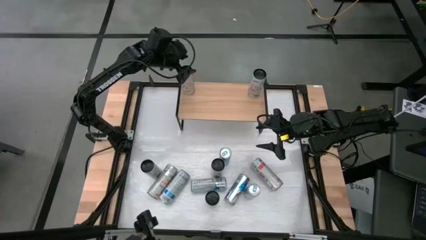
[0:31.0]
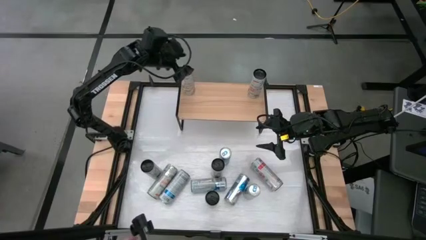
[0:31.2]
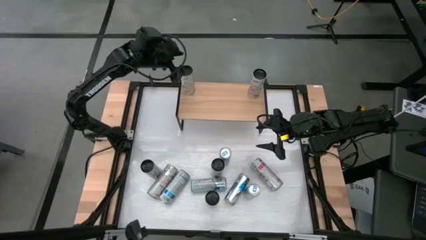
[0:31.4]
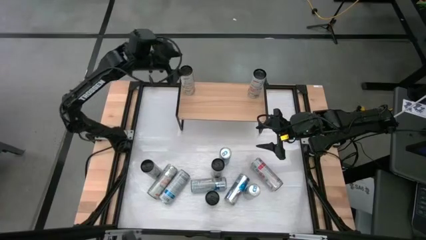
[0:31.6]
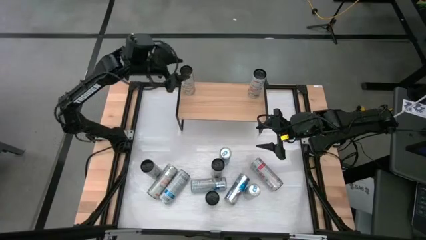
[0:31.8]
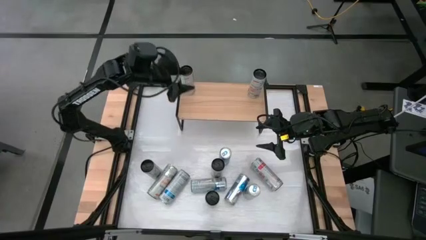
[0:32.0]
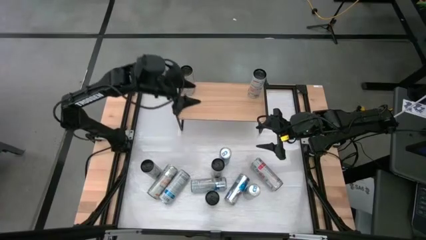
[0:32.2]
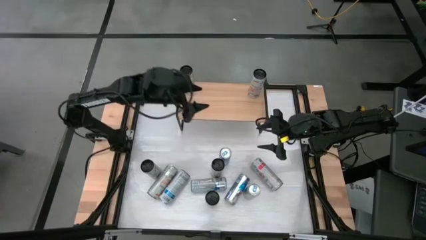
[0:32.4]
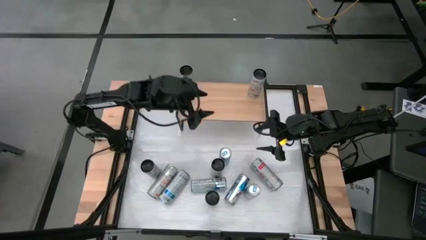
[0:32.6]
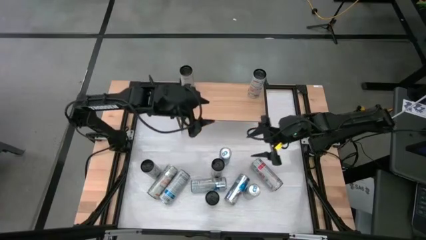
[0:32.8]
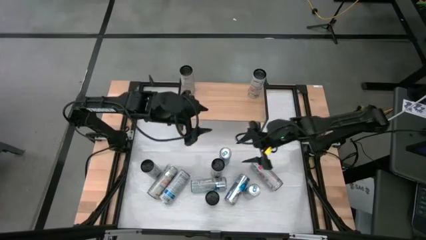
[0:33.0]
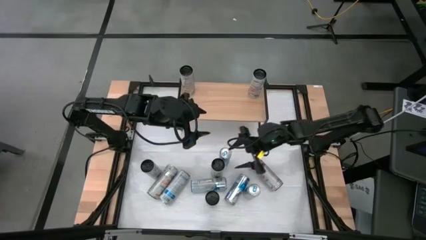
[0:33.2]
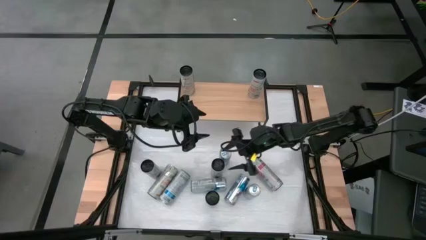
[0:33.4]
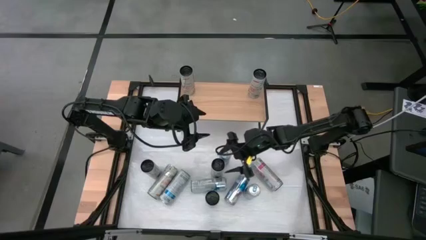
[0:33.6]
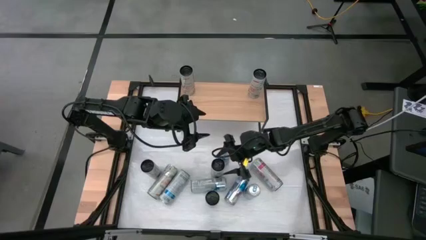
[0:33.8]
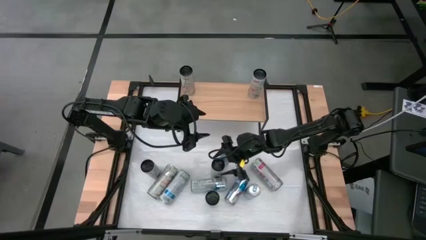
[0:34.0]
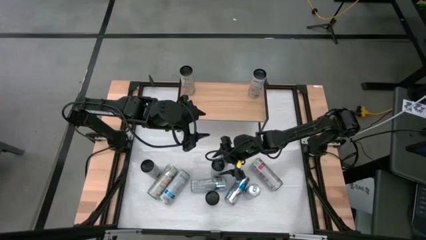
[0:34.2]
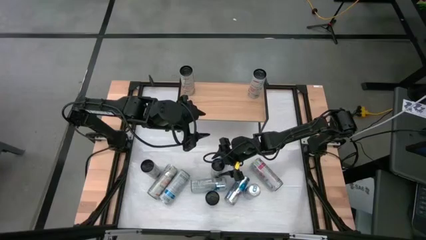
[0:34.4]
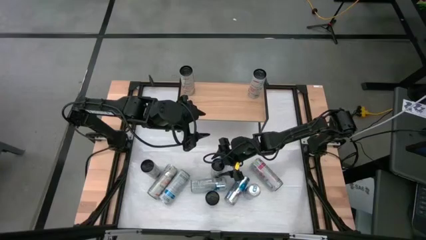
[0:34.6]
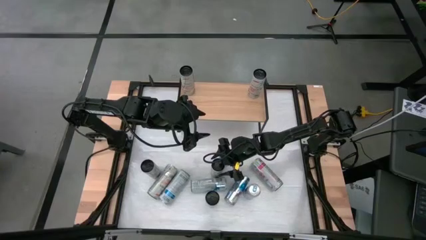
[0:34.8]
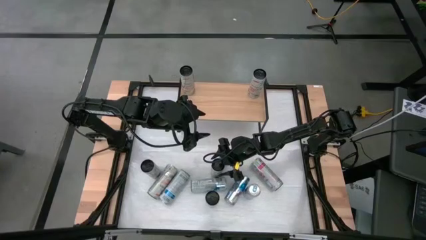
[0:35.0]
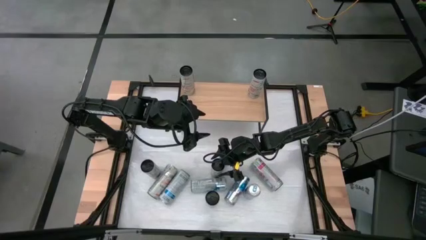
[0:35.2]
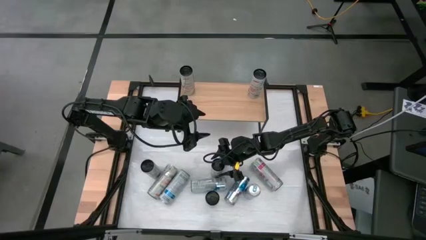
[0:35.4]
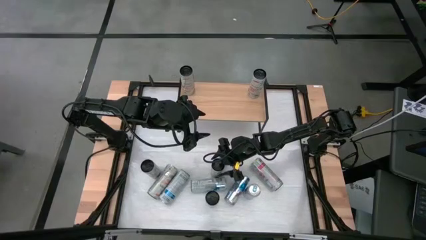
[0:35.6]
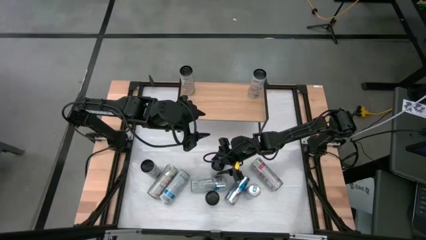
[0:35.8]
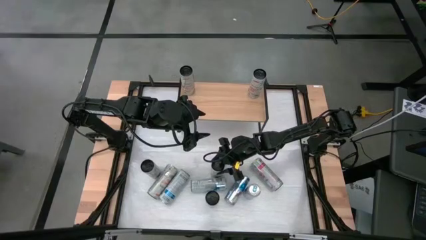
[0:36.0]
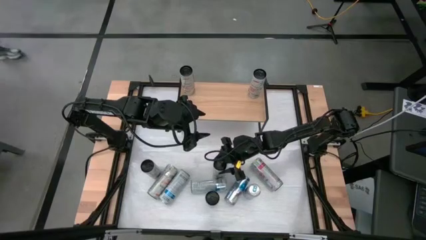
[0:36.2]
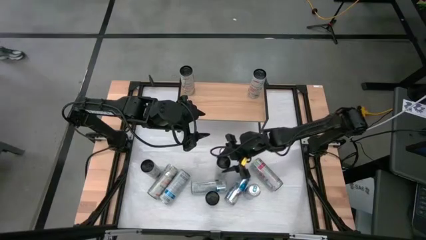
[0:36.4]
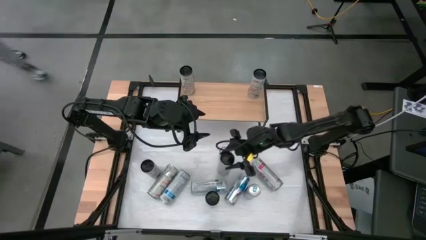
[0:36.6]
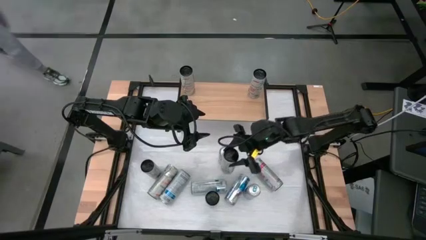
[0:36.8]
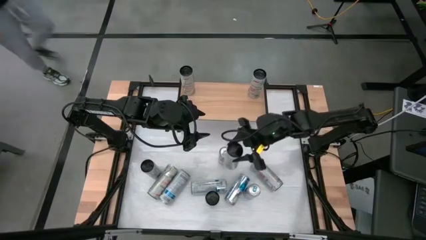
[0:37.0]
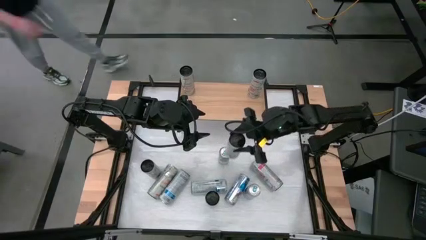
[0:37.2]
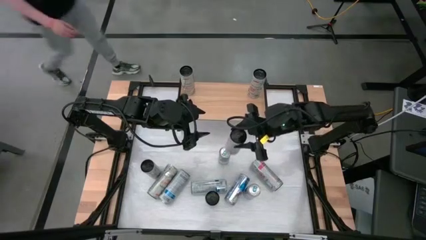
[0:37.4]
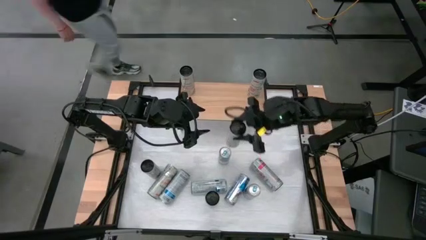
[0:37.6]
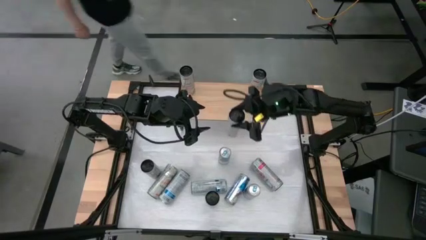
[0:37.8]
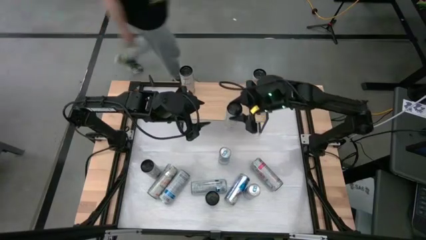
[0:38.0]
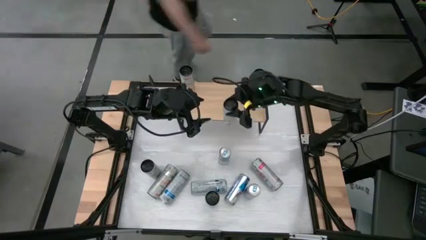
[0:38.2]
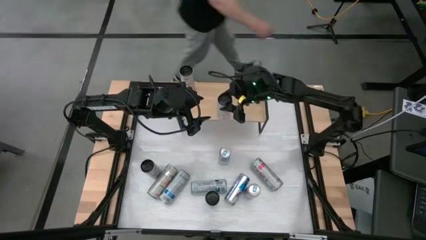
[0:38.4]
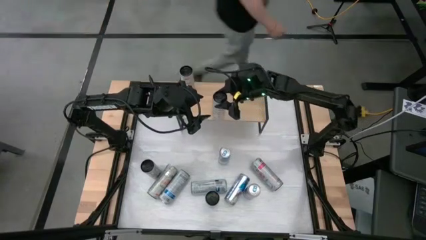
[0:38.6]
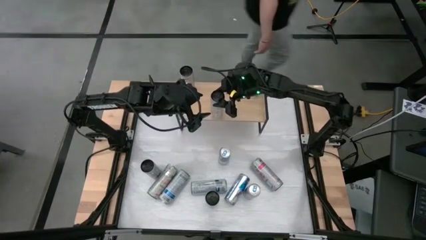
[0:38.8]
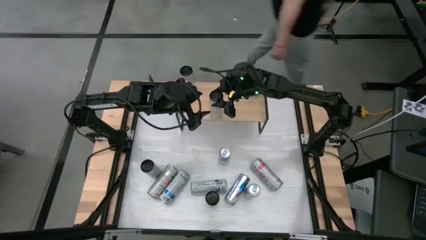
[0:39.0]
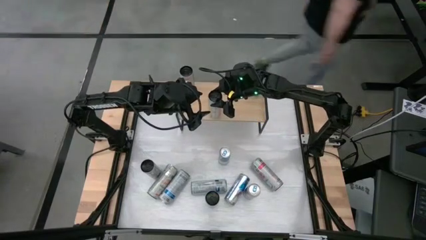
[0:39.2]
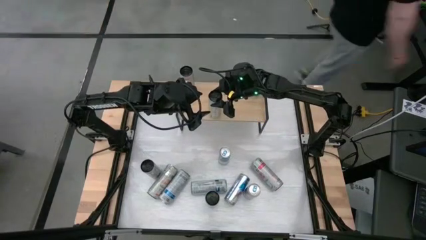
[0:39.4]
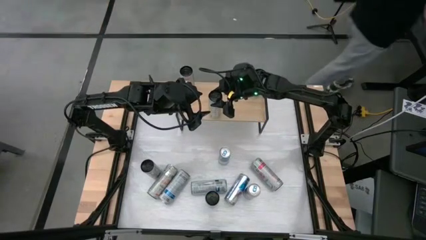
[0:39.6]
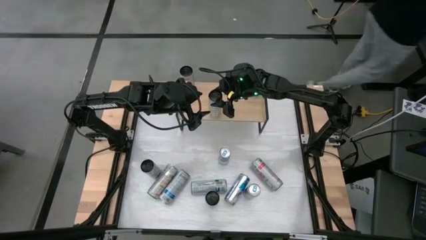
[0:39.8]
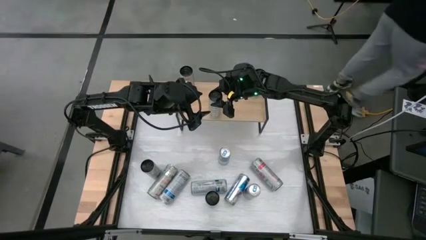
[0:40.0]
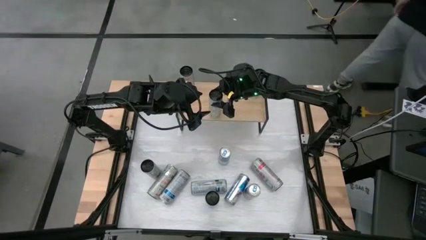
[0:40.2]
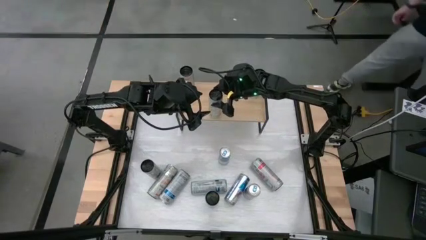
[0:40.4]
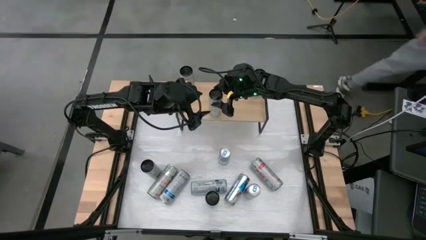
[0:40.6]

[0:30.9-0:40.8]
Task: Sort soda cans
Put the right white yellow soda can on the shelf and align with other white yellow soda cans

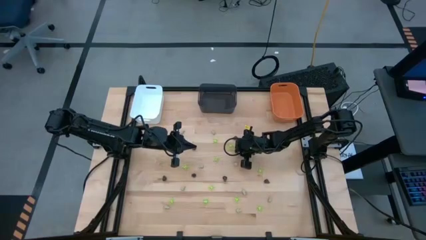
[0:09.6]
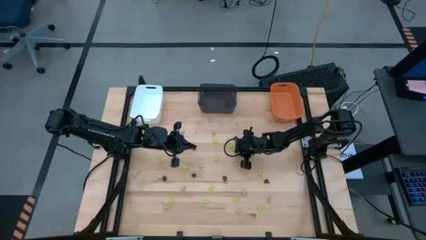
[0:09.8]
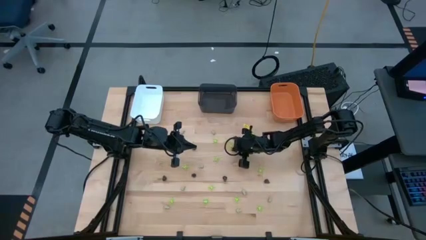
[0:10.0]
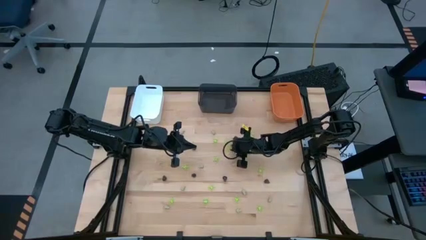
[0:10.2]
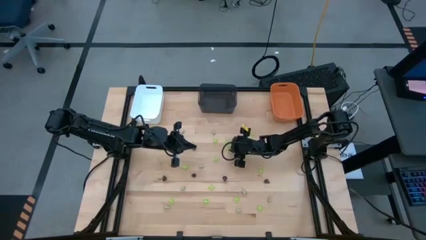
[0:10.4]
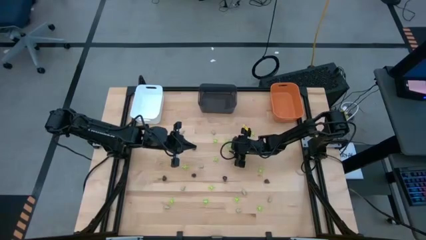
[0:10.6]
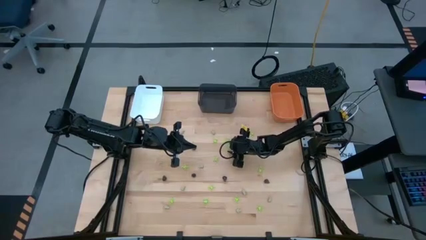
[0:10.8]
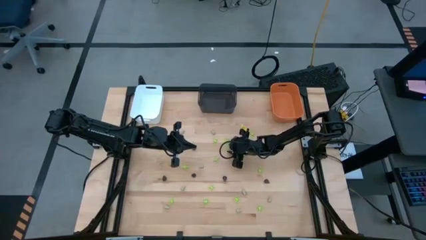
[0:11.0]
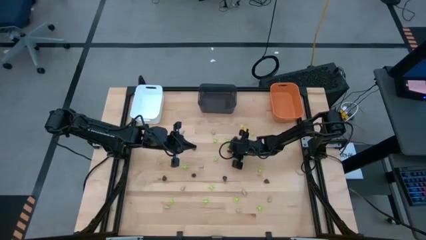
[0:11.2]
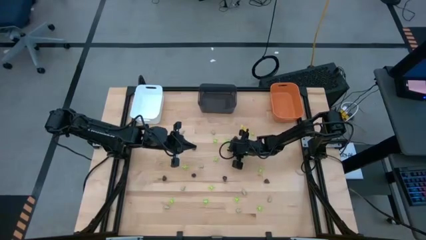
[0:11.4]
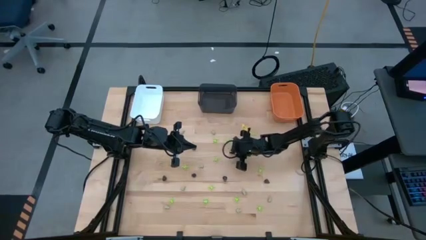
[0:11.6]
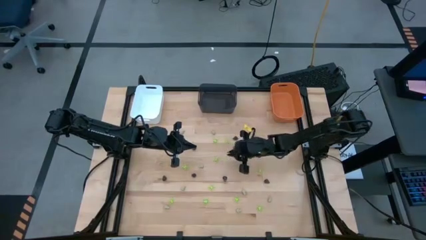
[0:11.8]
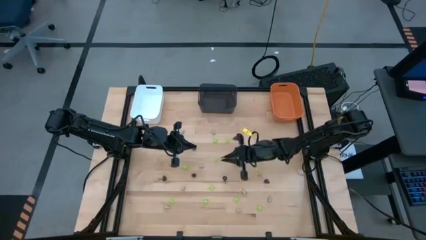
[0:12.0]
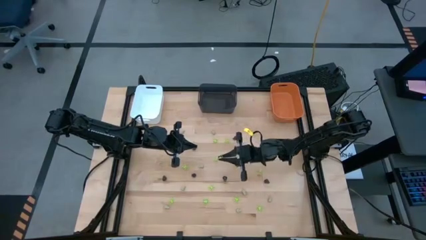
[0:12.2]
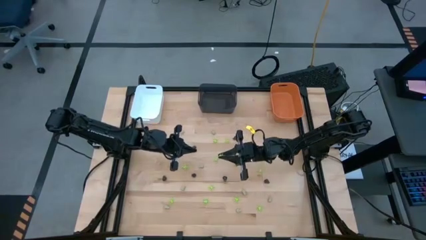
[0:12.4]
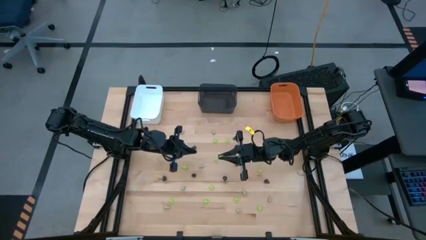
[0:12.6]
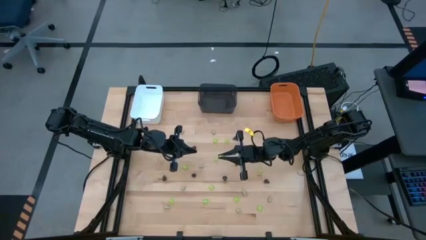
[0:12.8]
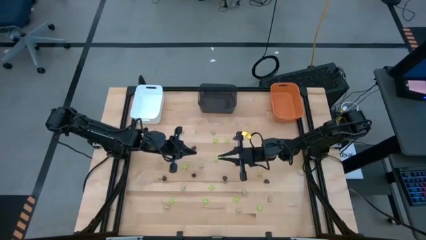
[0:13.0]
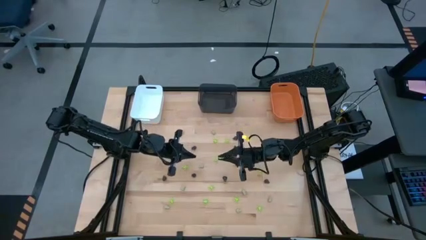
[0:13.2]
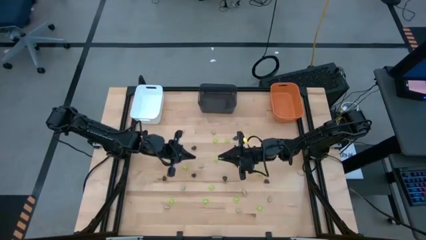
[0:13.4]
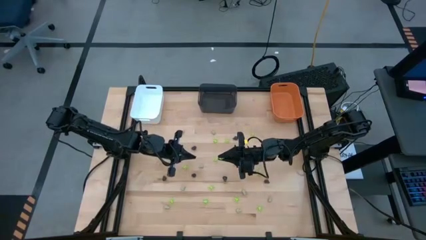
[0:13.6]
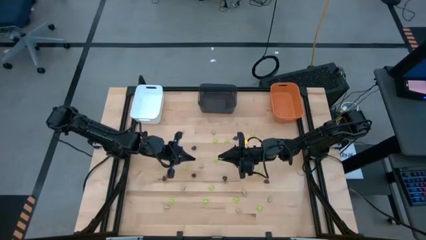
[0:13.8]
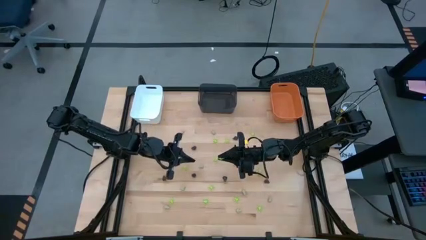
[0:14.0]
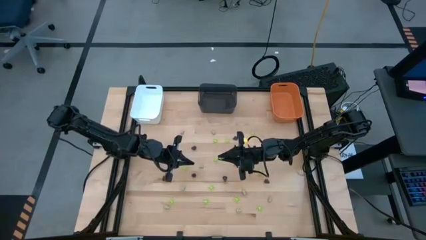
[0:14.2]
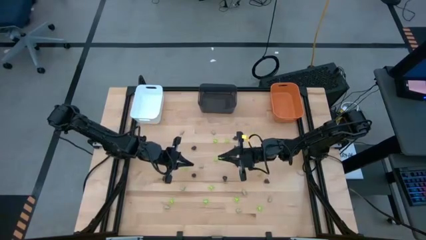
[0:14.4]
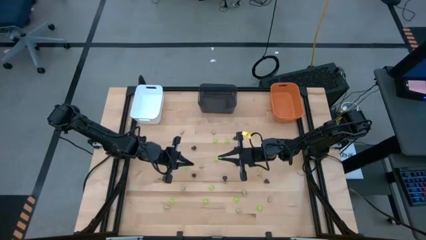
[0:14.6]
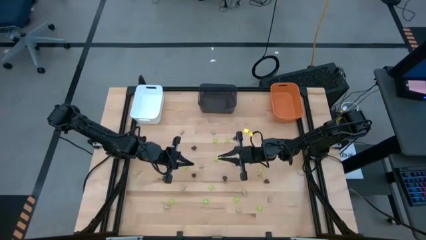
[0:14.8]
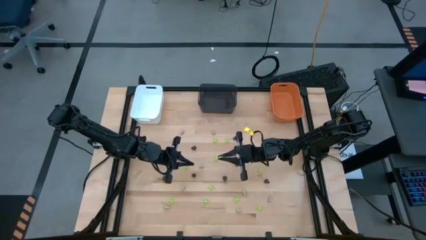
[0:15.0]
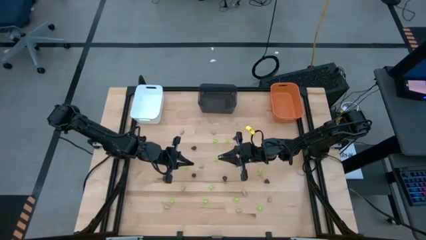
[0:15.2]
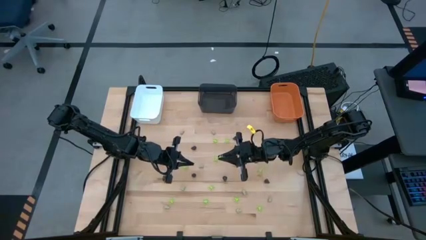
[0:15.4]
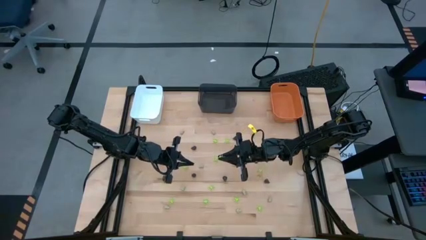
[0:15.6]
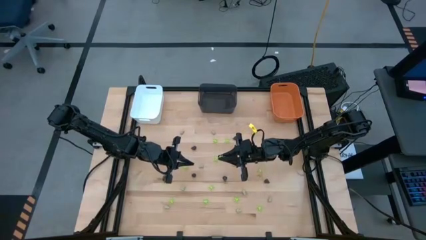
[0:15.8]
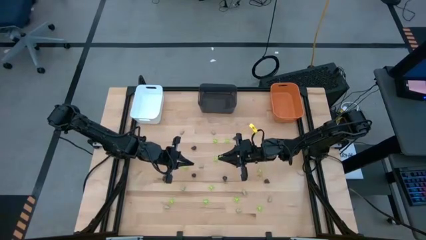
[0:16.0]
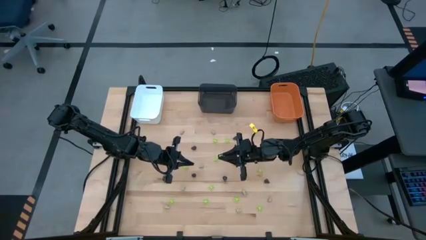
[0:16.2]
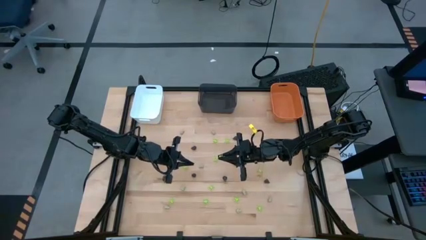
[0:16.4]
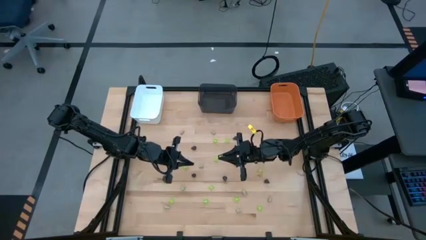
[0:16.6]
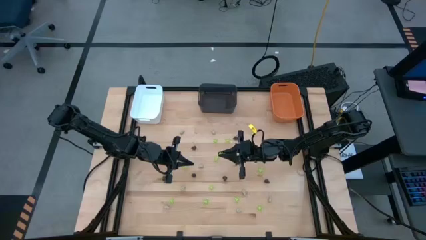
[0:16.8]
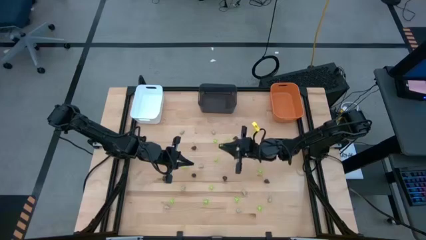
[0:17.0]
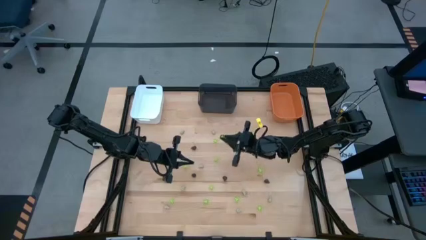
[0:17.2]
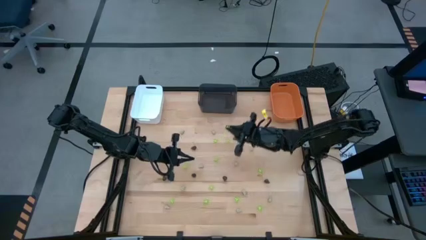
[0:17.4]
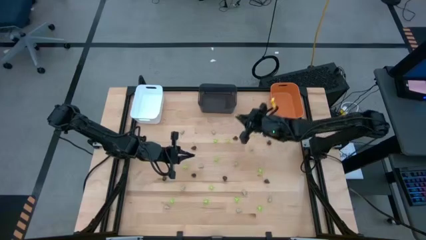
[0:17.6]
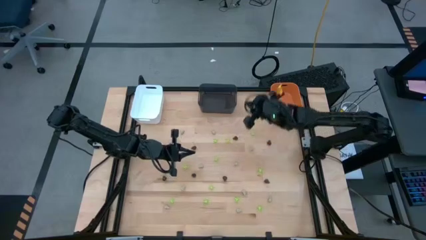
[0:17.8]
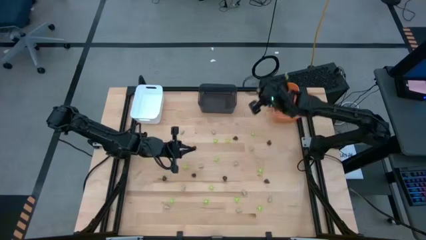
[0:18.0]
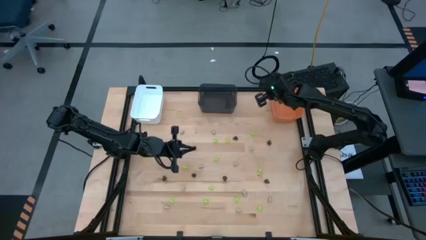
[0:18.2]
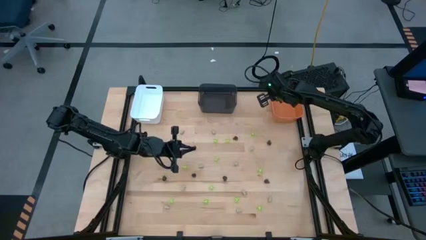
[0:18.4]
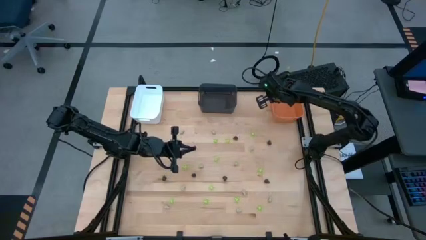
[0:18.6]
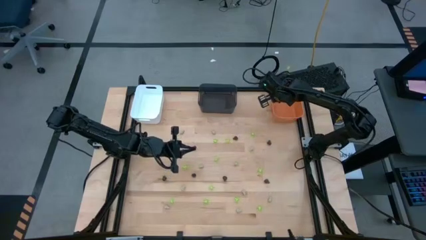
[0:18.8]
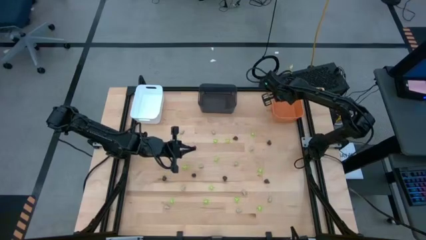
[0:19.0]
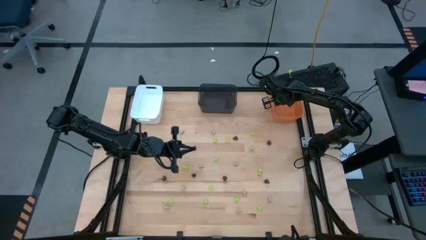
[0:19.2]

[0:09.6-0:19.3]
Task: Sort Halloween decoration
Put the green toy spider into the orange bin
